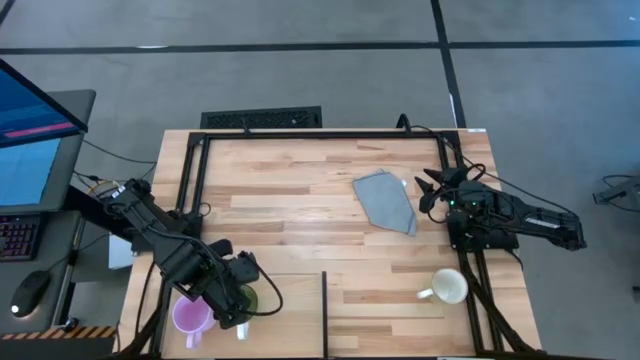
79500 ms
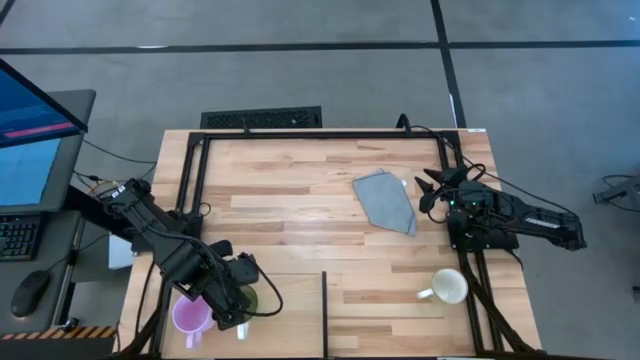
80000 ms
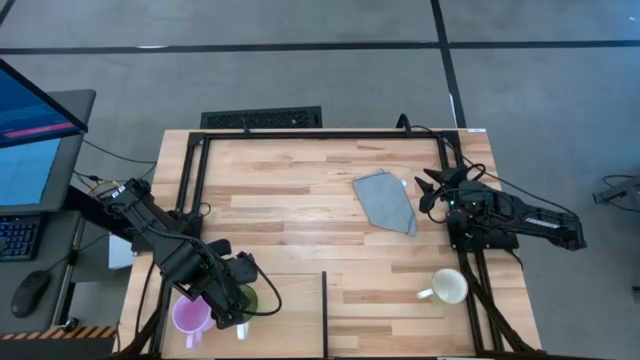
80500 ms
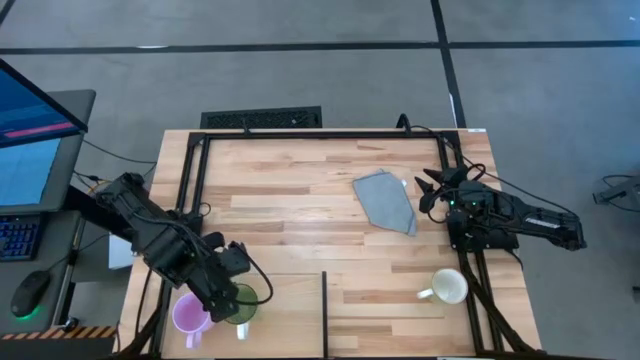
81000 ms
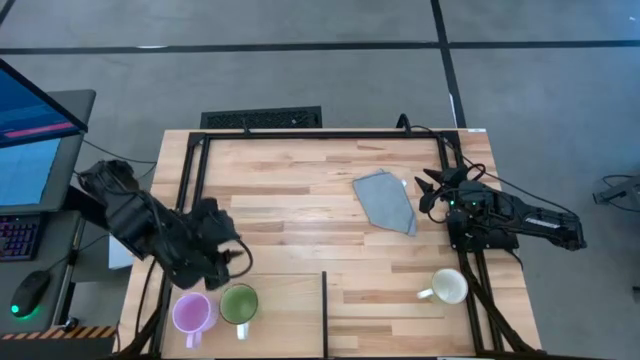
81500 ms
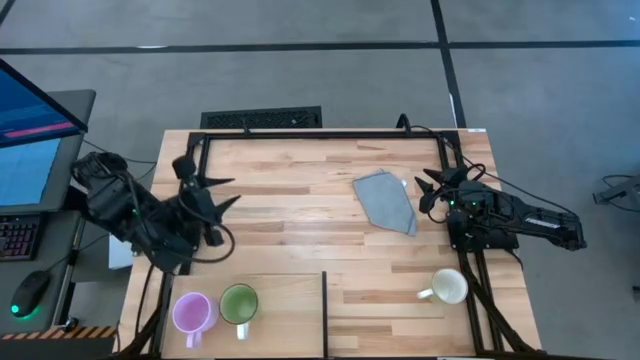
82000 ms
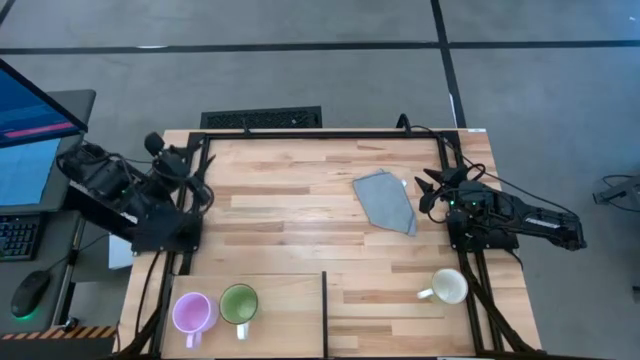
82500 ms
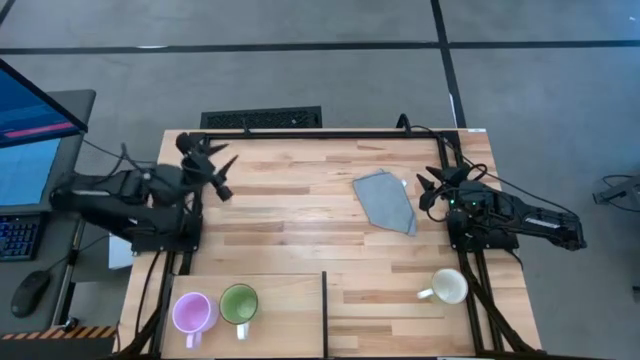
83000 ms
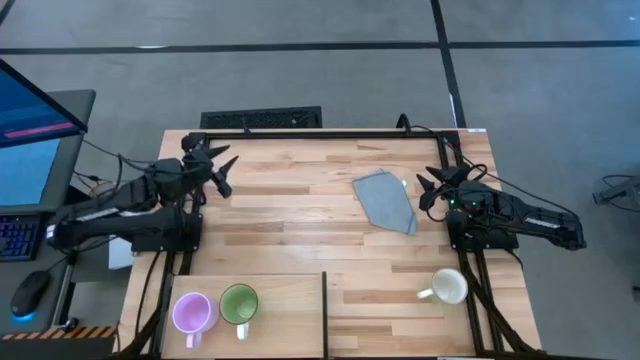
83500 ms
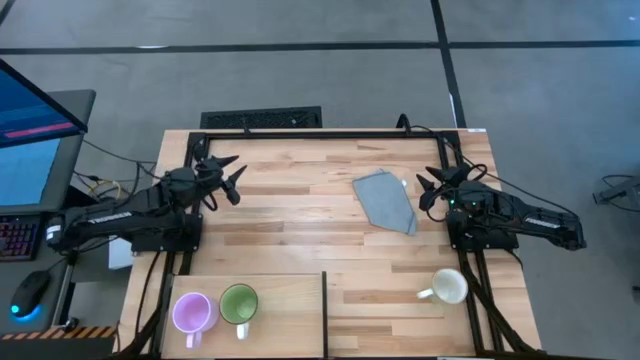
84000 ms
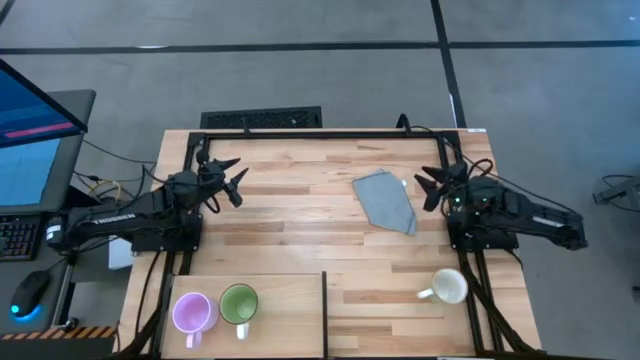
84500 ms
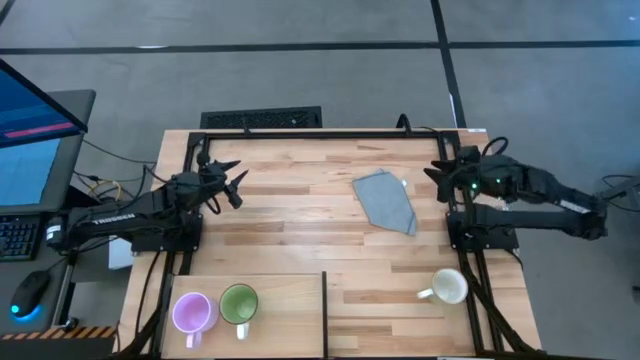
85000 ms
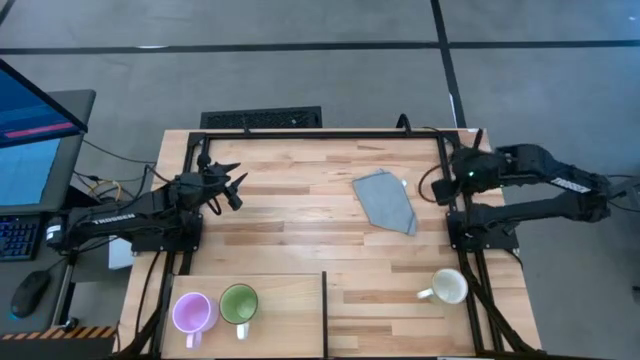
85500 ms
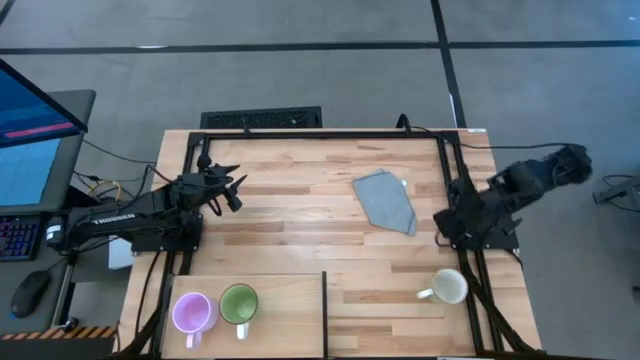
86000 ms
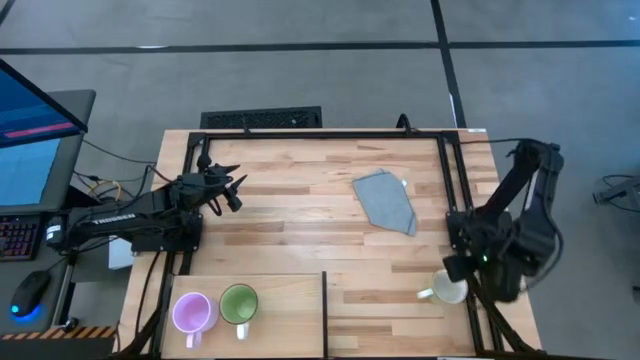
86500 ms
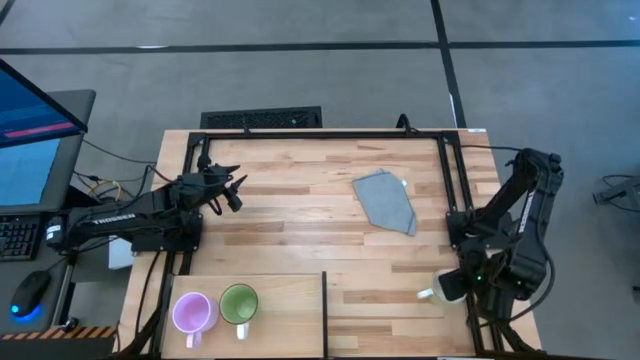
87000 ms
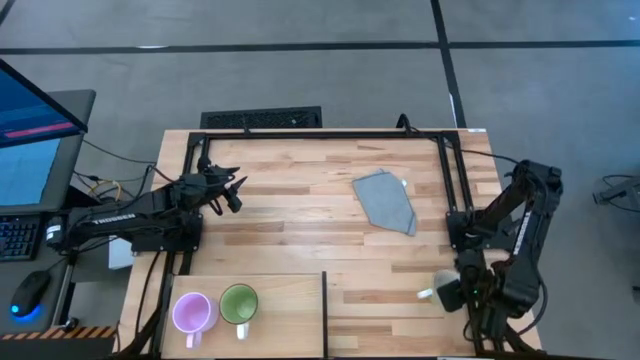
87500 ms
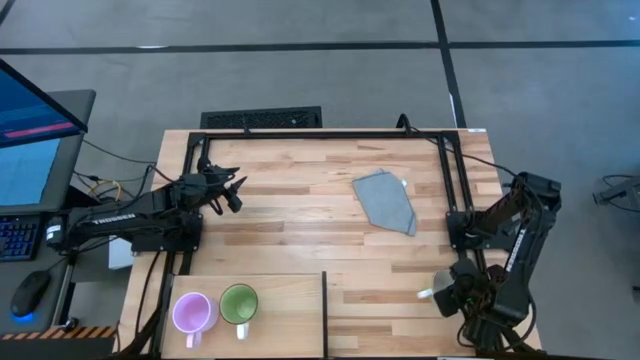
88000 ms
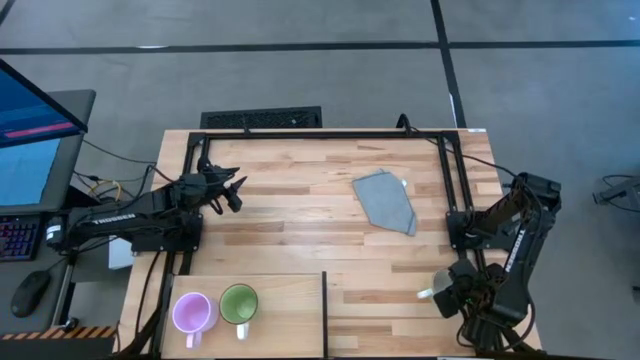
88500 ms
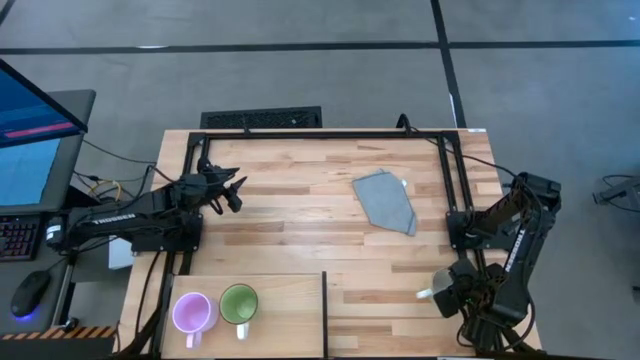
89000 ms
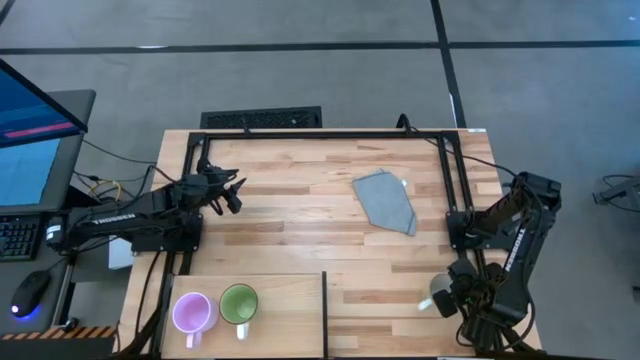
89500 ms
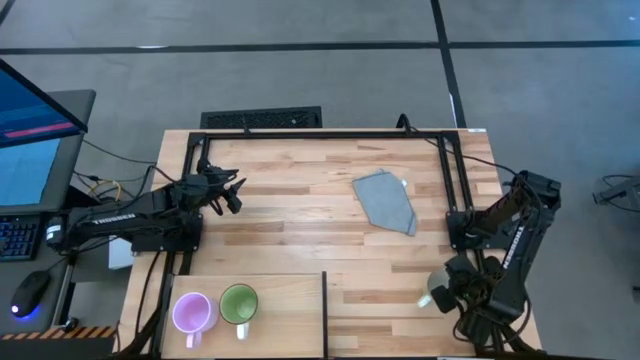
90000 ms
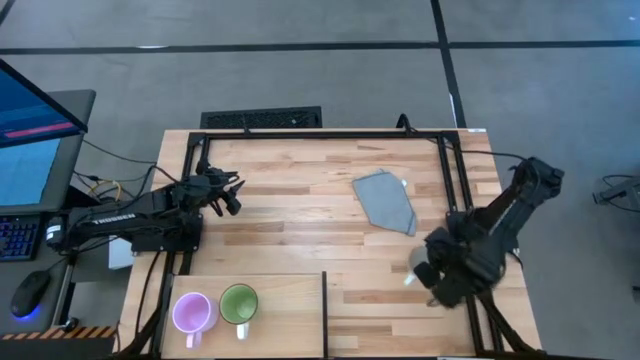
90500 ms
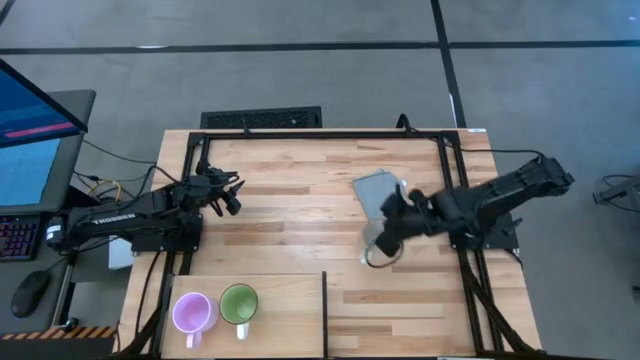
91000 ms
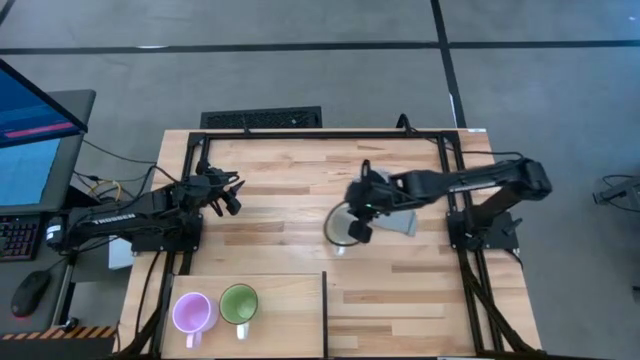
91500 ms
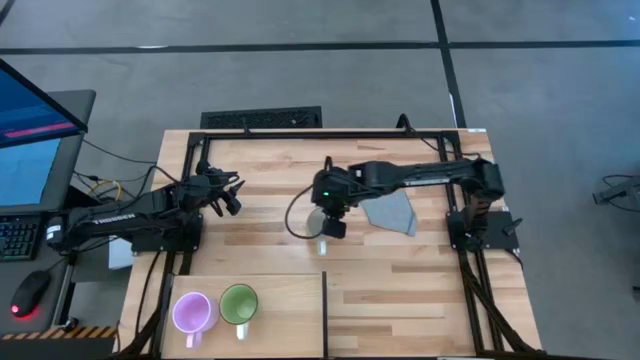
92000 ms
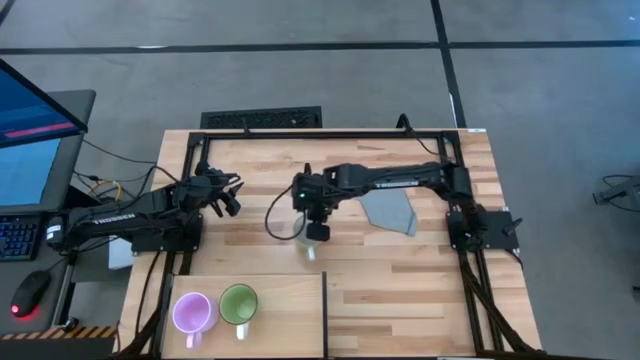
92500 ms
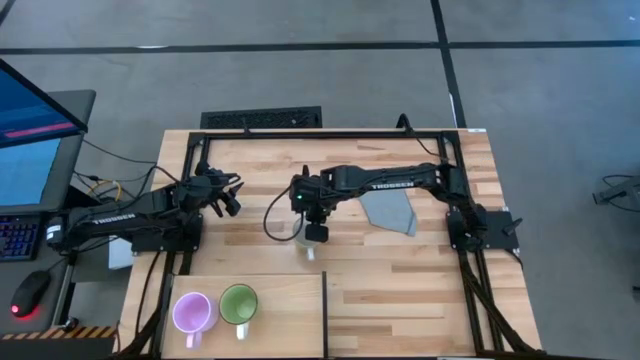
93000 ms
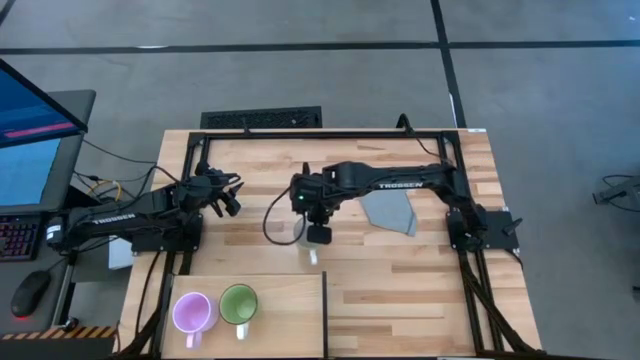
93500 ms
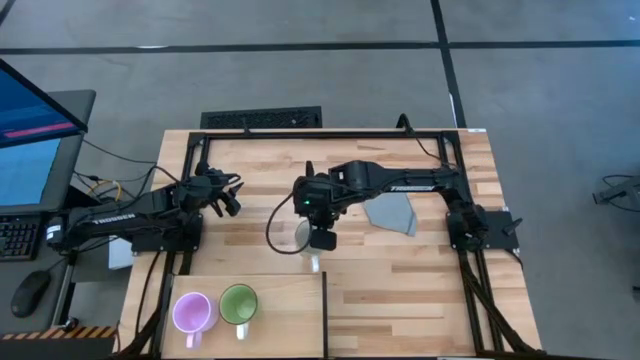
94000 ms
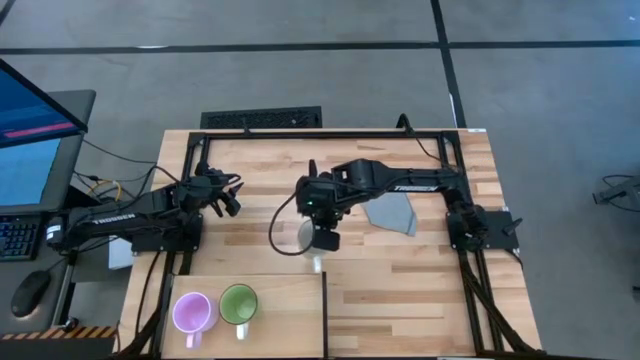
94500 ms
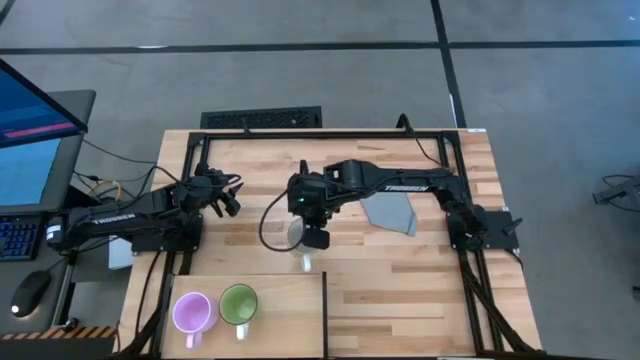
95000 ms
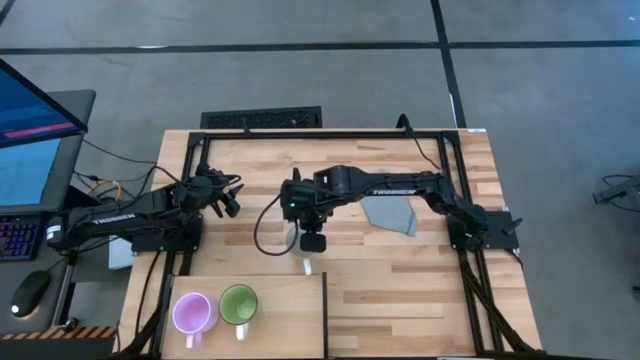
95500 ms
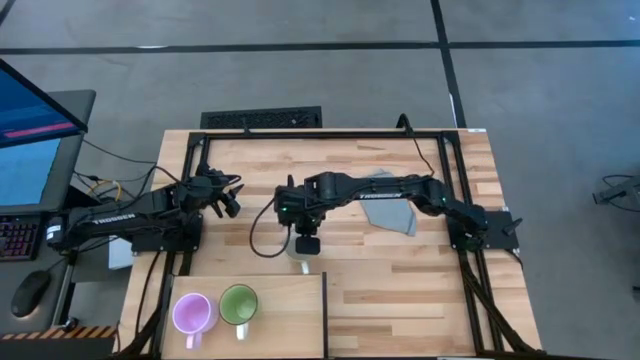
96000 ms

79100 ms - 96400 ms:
Task: Stack small to large cups/mugs on shelf
Put the light green mug on the shelf

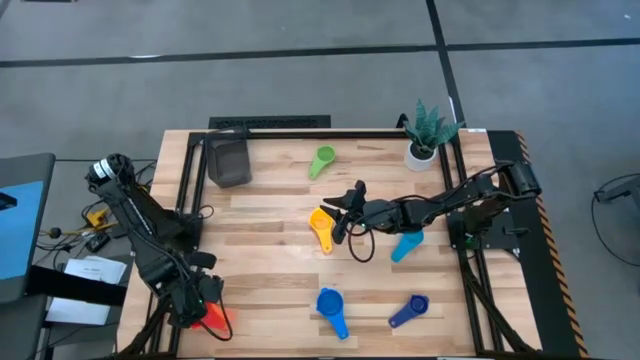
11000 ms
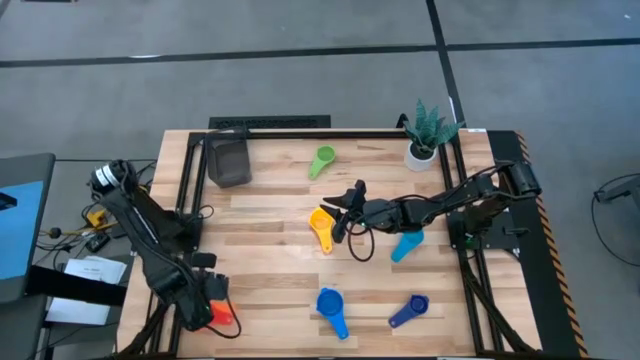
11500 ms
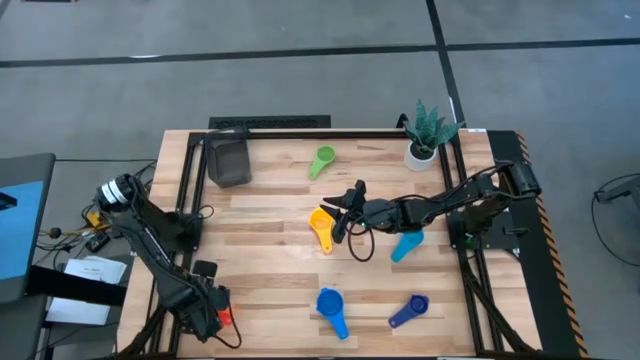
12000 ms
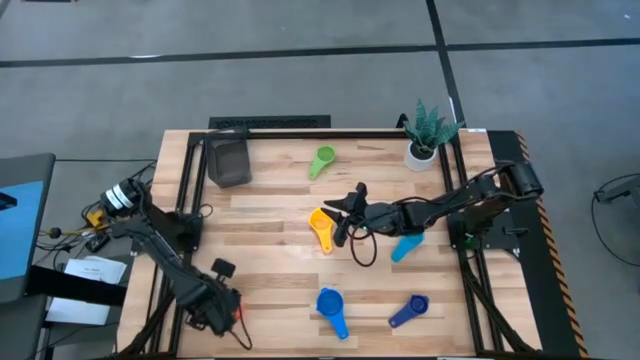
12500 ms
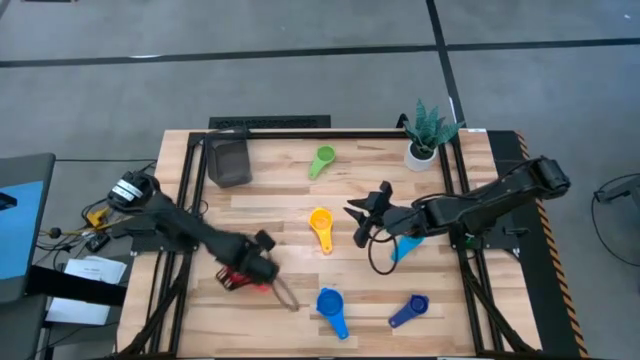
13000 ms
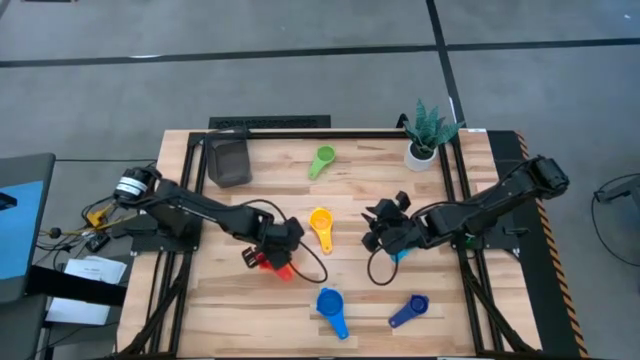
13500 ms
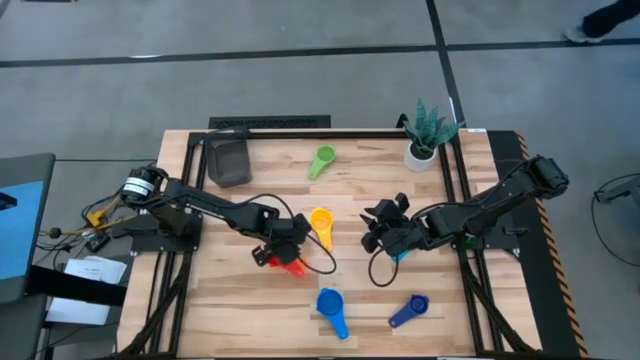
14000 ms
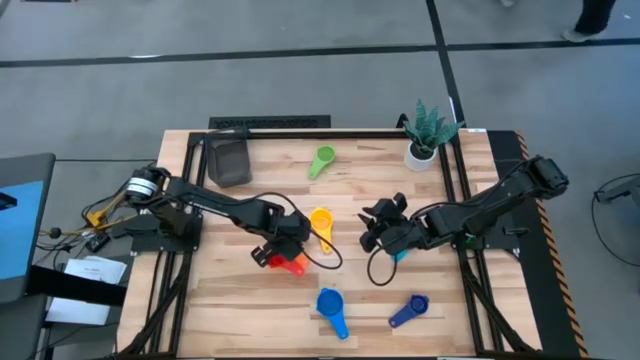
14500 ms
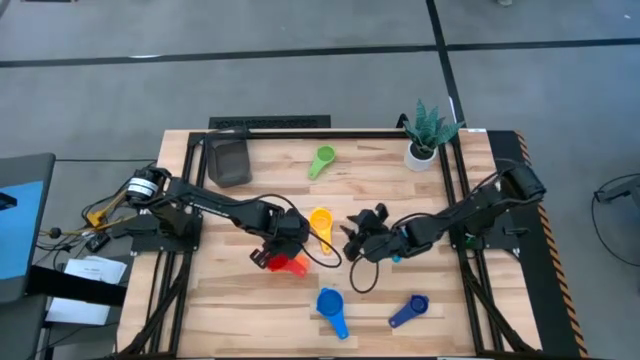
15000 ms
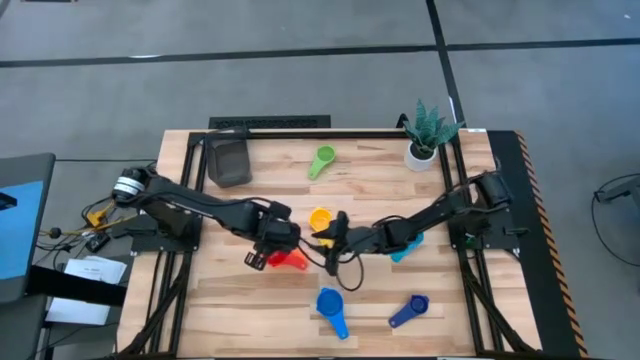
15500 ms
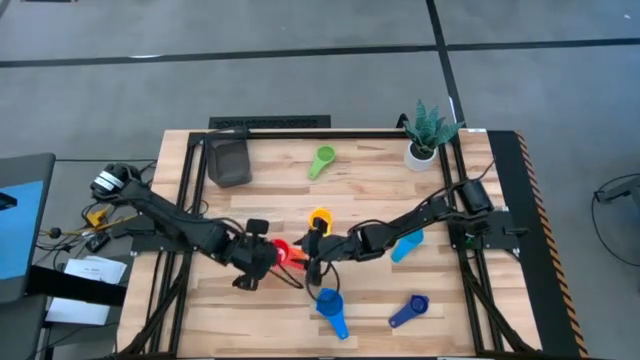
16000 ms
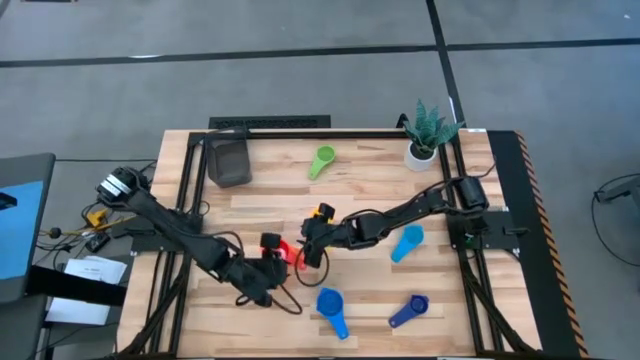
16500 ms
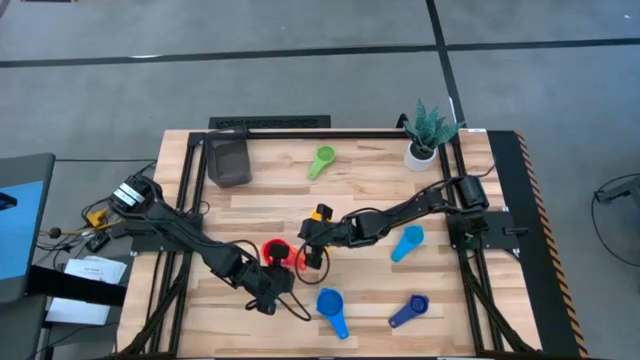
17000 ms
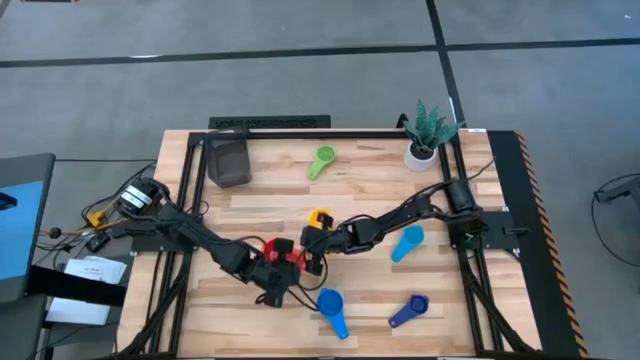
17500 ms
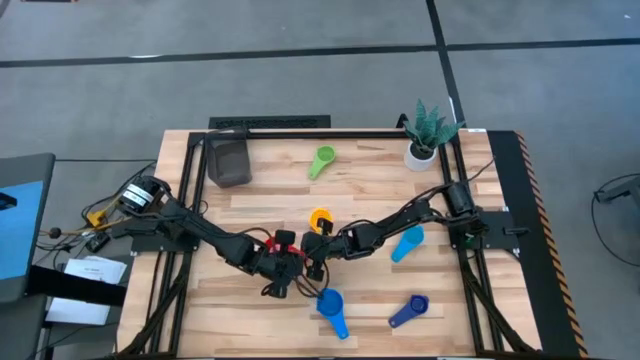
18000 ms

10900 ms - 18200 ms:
Task: Nest measuring cups in basket
Move the stacked measuring cups to the center of the table
